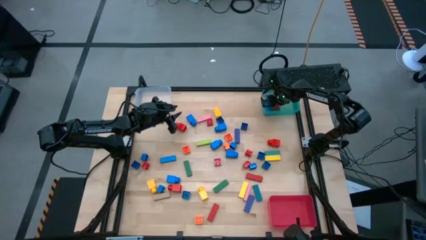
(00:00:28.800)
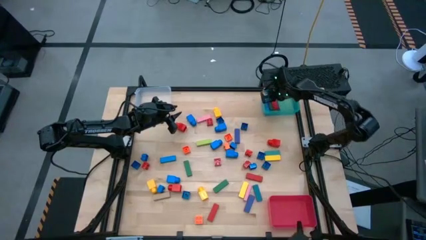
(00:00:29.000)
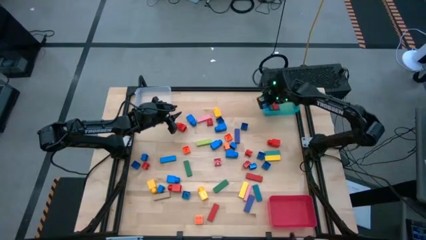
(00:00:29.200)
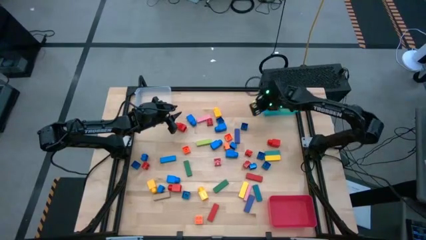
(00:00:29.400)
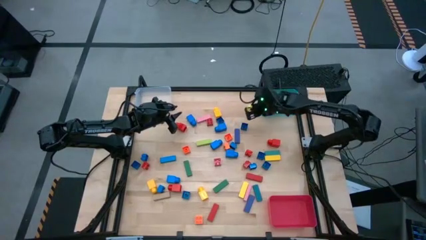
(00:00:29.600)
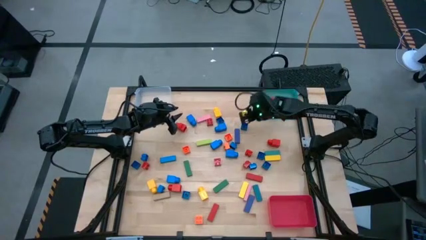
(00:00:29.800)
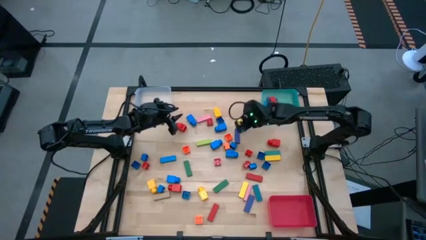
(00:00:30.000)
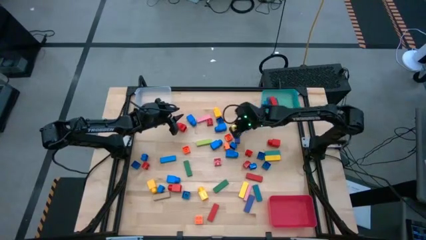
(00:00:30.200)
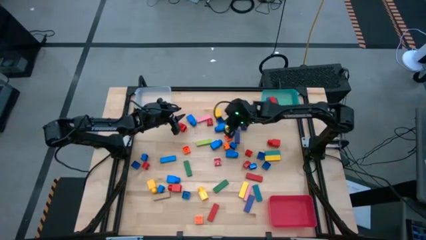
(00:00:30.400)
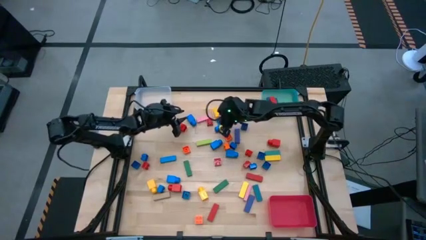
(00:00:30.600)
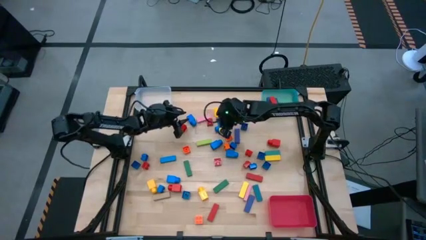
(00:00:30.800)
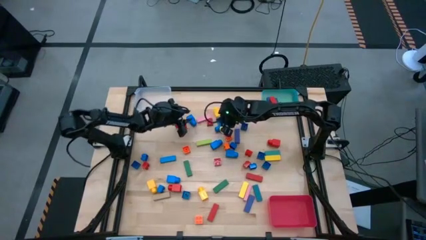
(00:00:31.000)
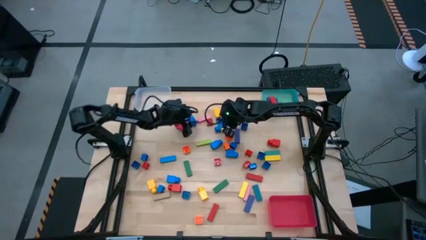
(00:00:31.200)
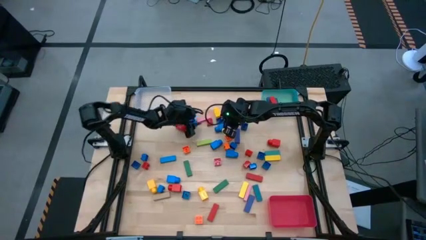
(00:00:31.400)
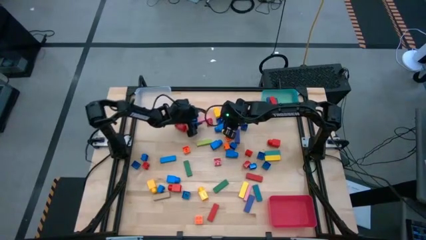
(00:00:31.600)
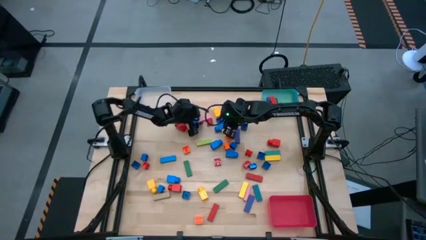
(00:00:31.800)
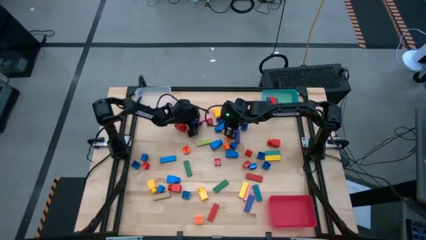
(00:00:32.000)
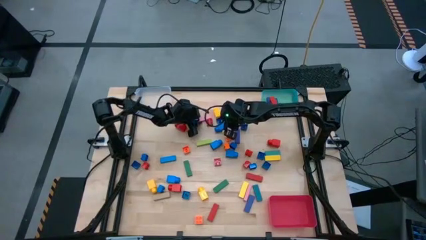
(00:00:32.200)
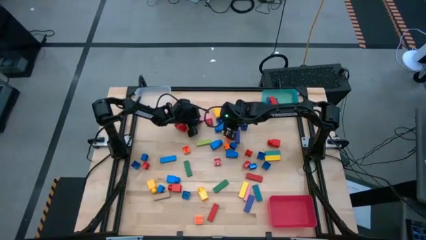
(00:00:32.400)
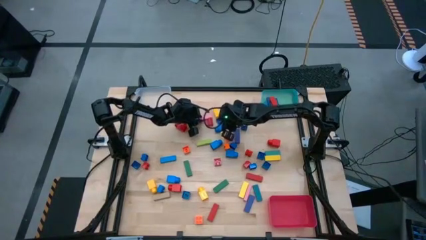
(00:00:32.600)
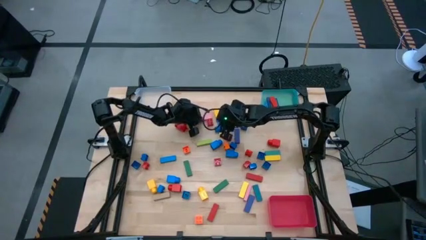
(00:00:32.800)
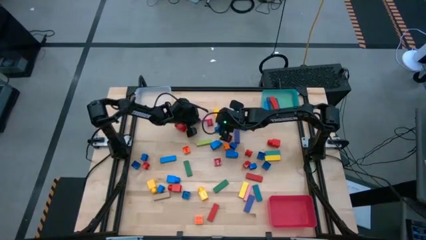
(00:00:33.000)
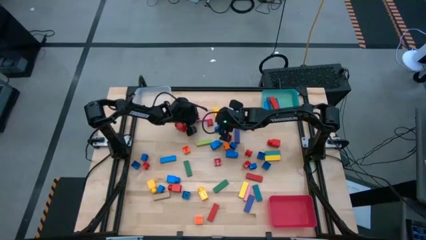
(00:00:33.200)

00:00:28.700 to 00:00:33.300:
Task: Sort blocks by size
Put the pink block into the blue bin

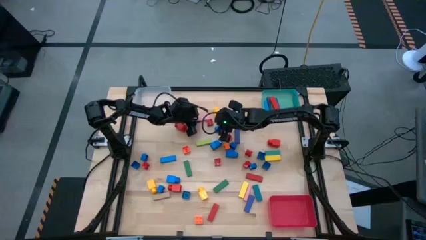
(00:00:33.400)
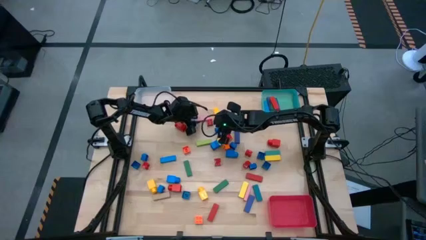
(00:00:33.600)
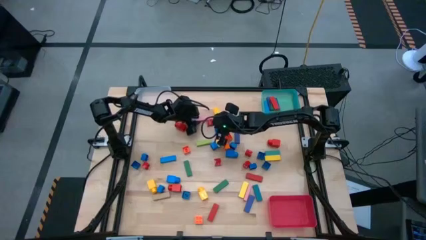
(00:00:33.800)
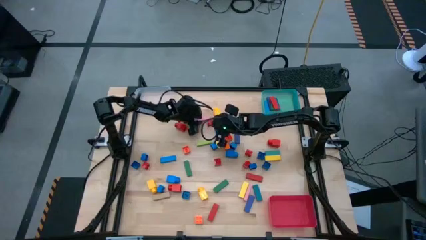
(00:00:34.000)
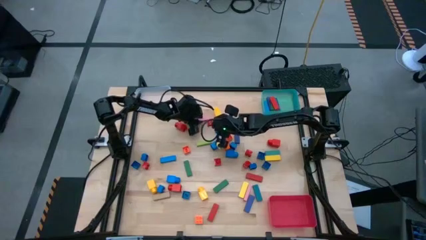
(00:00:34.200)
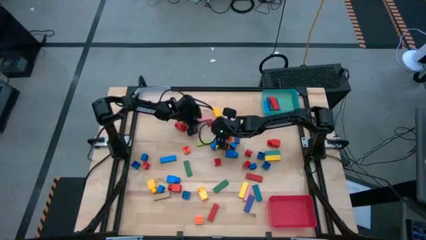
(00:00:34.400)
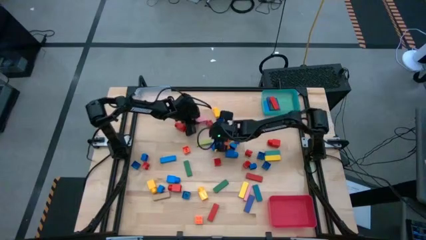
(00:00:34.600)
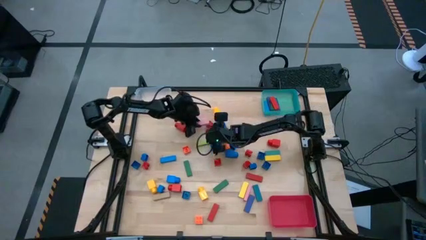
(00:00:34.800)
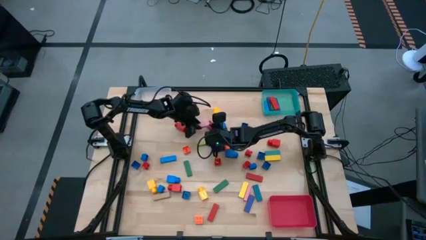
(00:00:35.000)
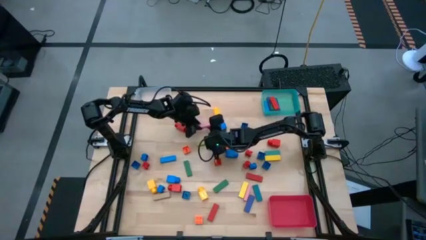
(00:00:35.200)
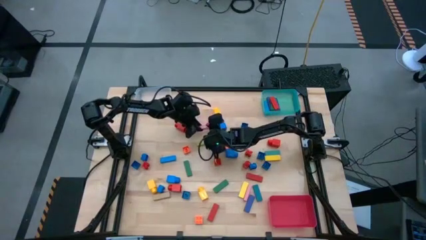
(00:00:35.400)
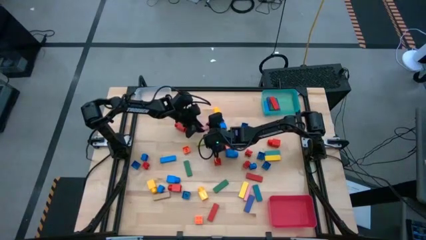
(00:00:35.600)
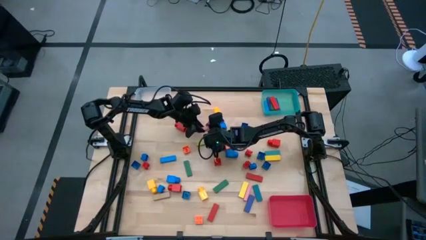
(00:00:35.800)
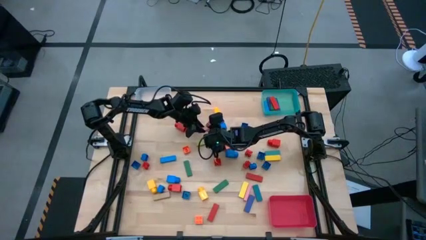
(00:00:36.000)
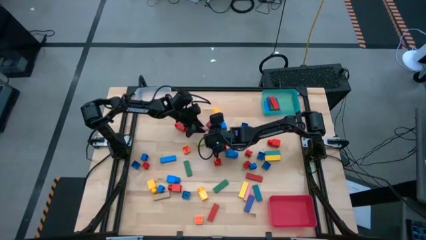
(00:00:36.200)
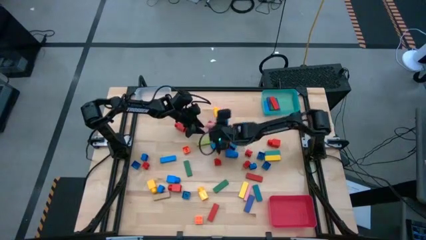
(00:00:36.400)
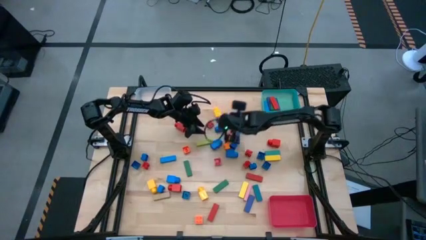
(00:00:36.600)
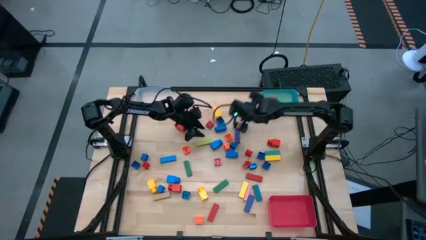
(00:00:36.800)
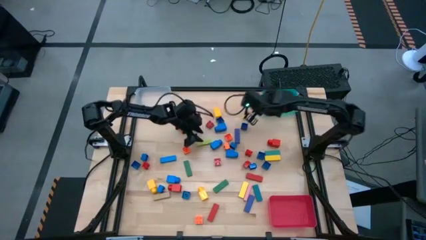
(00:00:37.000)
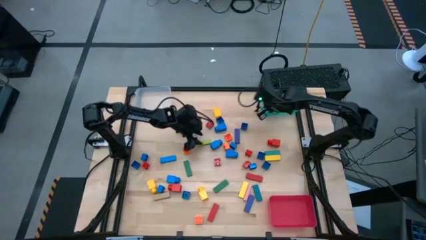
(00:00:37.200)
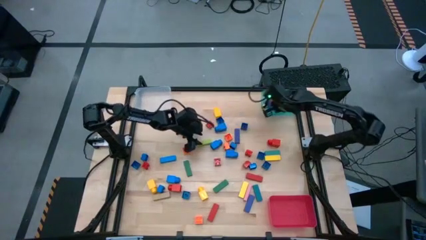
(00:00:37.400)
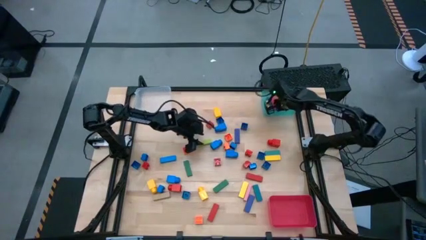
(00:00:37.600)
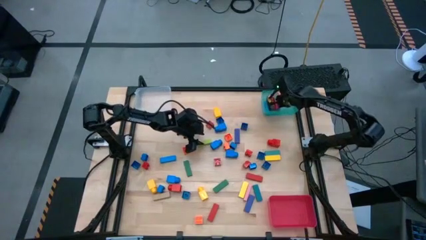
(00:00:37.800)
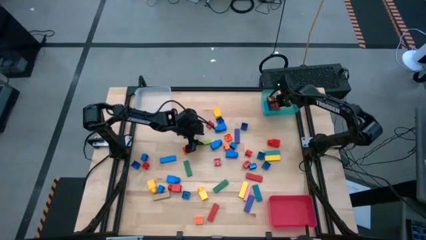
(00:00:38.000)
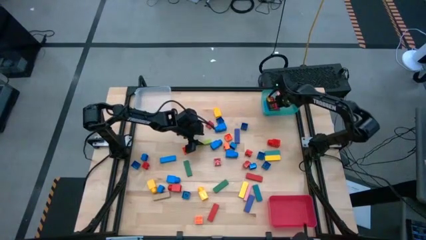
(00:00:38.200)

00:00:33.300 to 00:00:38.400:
Put the pink block into the blue bin

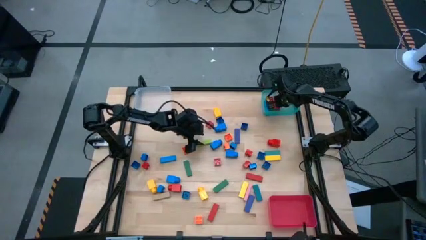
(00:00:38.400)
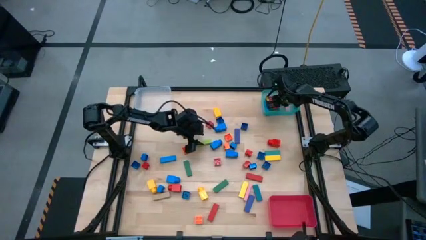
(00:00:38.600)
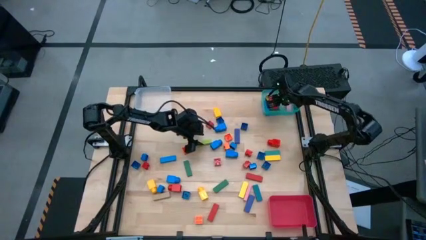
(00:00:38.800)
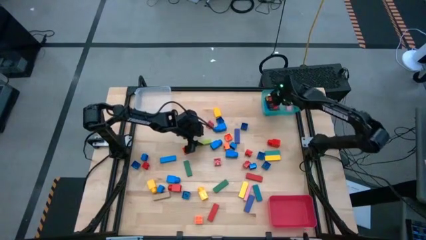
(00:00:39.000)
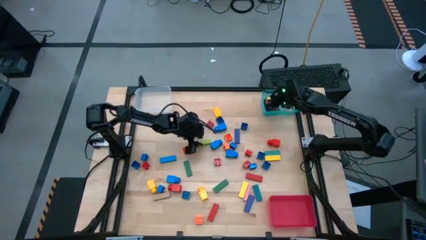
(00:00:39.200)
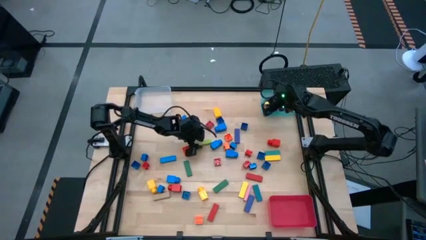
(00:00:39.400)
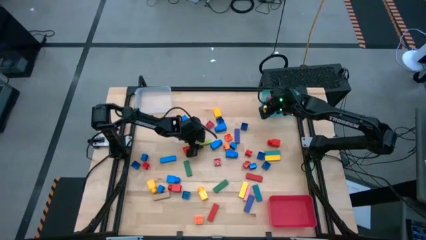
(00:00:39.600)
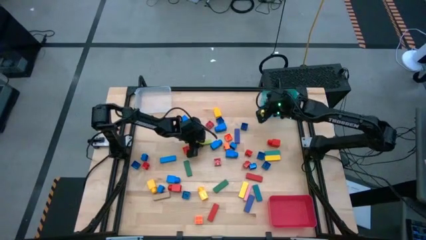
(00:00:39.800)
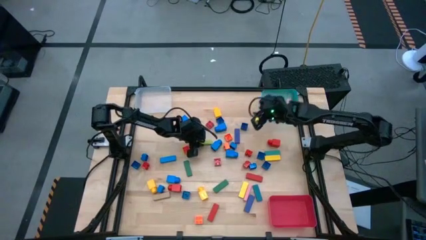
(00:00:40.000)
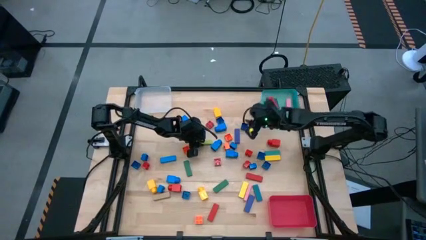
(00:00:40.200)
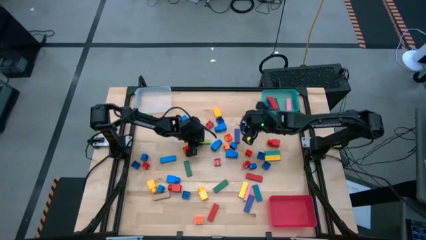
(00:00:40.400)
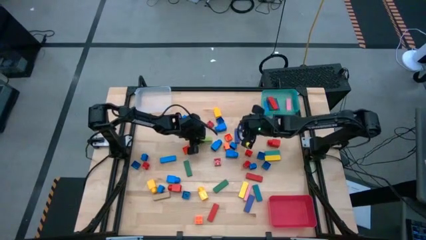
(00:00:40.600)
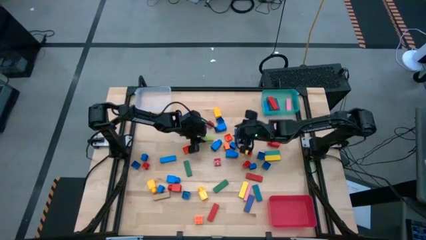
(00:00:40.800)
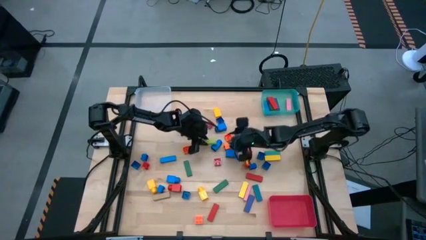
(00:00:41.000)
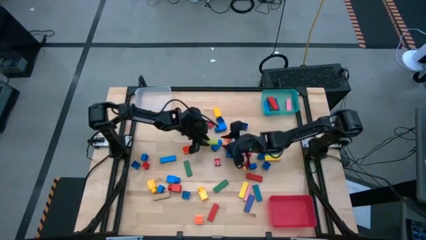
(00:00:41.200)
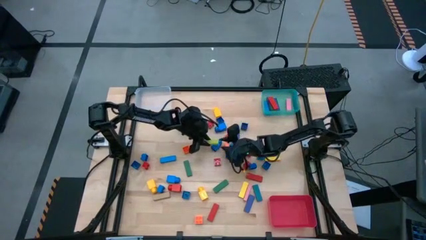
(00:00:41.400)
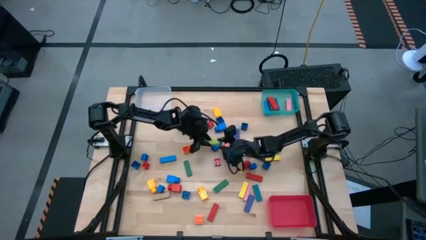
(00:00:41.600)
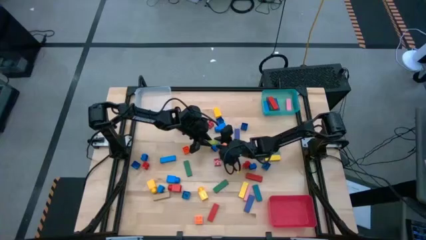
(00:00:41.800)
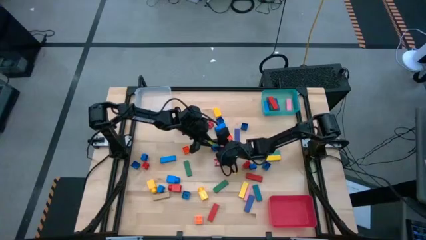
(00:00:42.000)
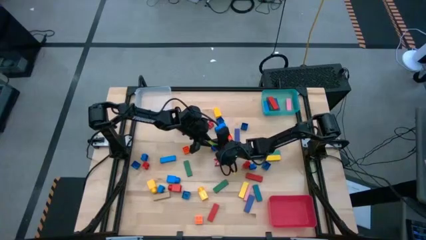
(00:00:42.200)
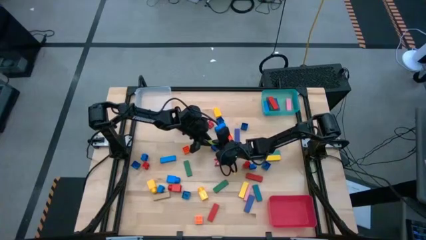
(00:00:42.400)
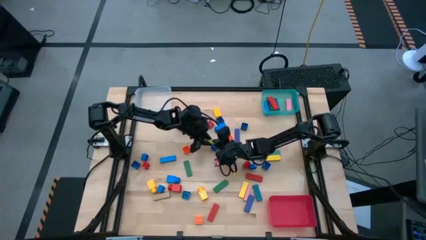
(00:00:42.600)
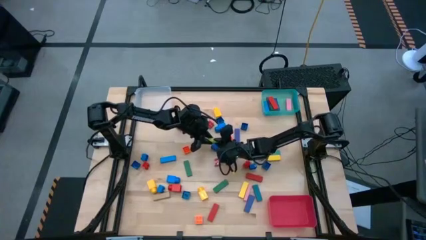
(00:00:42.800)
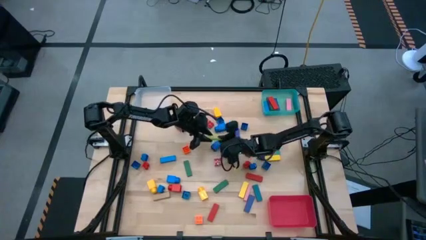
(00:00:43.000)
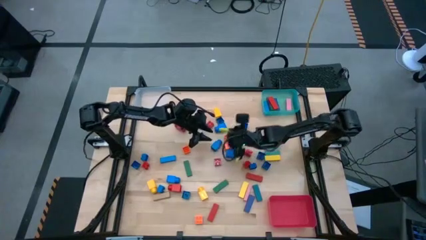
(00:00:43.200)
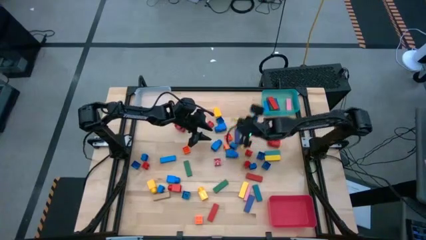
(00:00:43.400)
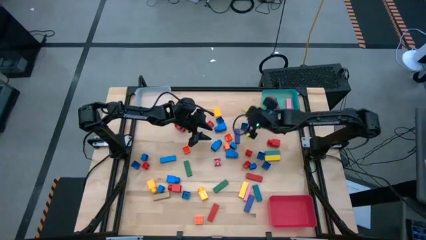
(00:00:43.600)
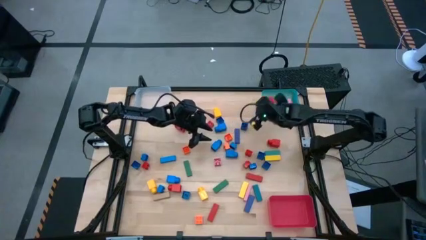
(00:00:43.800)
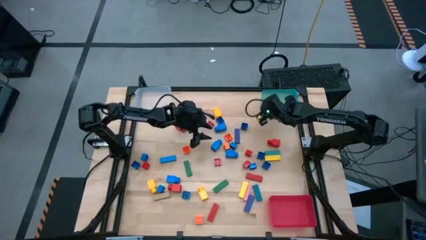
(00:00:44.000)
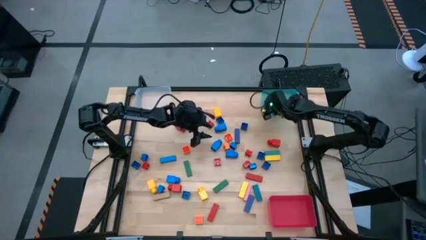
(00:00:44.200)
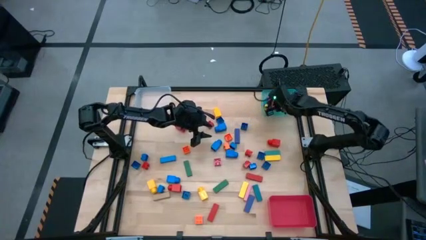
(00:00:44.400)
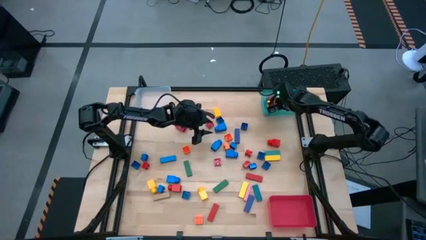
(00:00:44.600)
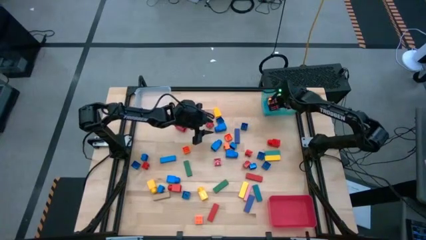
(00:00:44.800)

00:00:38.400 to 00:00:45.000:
Put the green block into the blue bin
